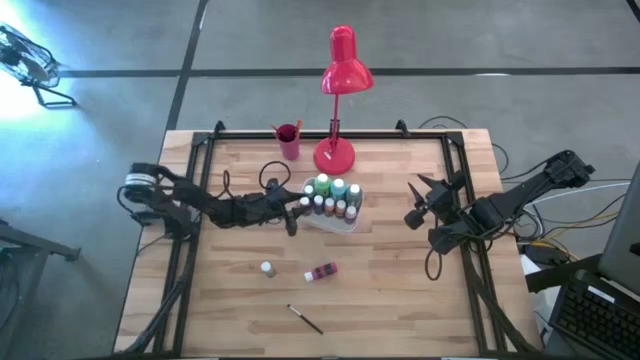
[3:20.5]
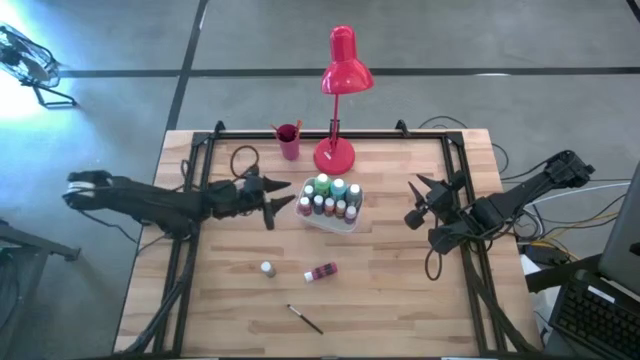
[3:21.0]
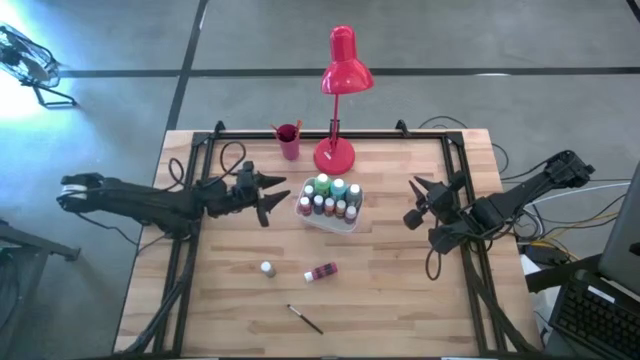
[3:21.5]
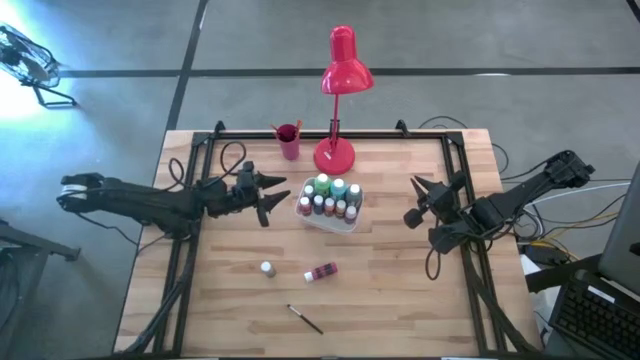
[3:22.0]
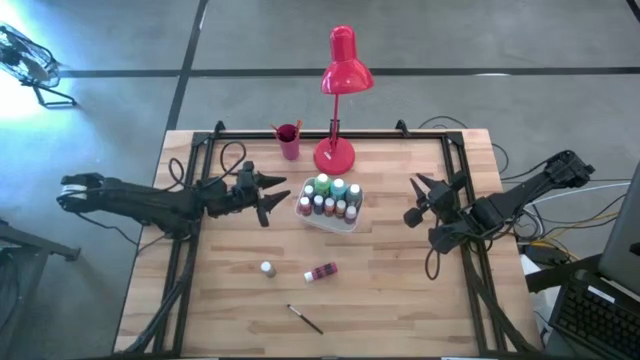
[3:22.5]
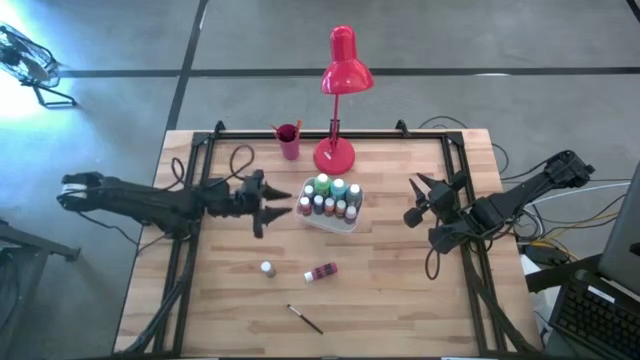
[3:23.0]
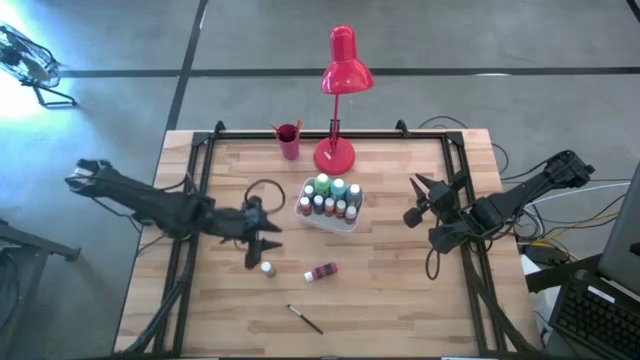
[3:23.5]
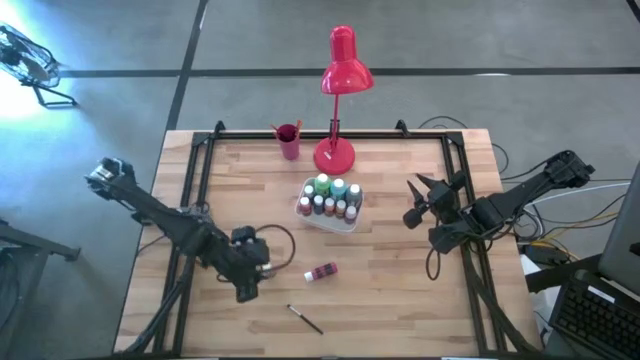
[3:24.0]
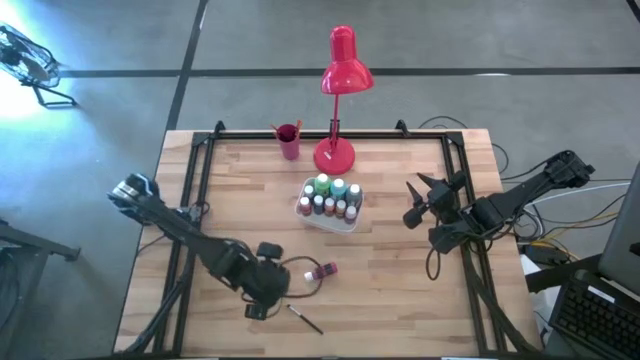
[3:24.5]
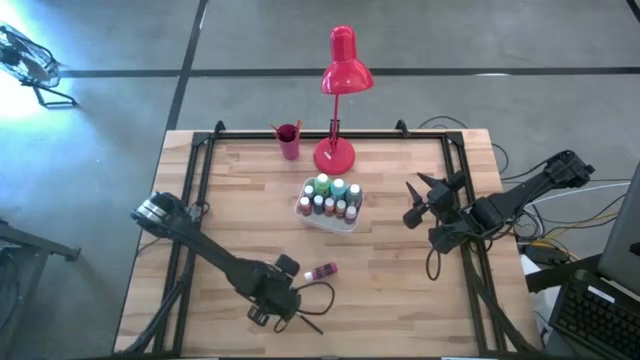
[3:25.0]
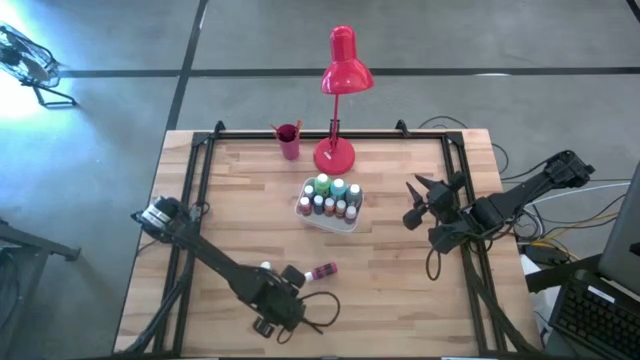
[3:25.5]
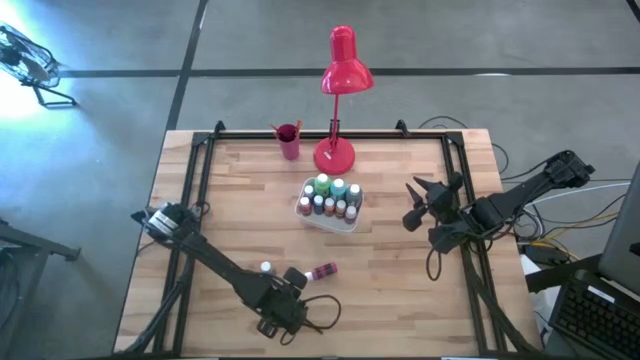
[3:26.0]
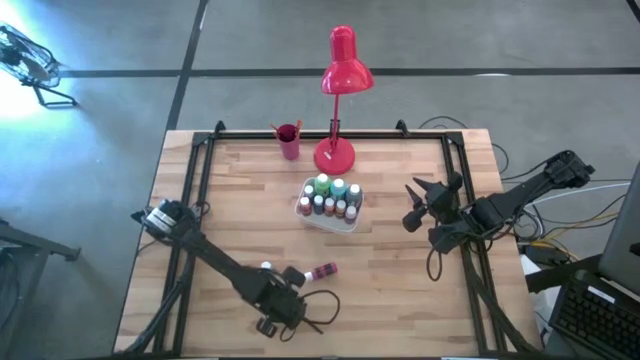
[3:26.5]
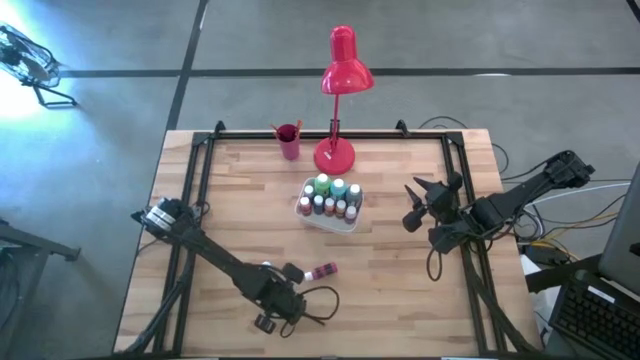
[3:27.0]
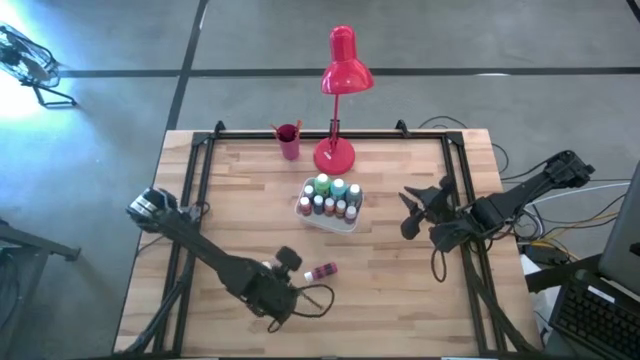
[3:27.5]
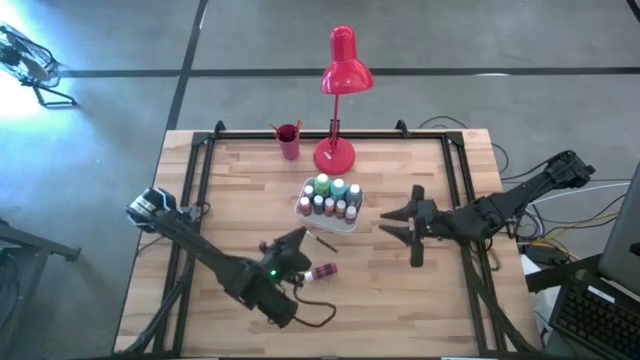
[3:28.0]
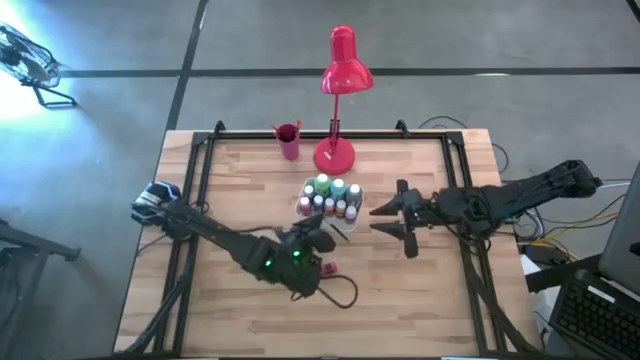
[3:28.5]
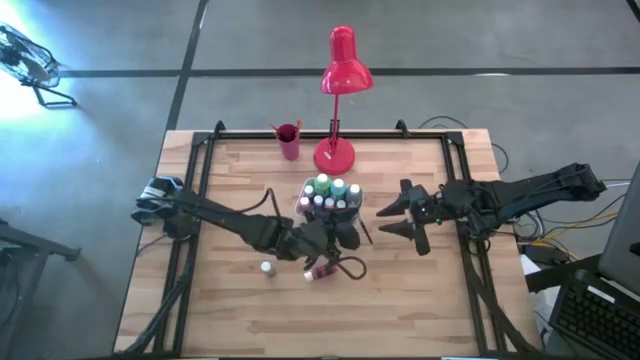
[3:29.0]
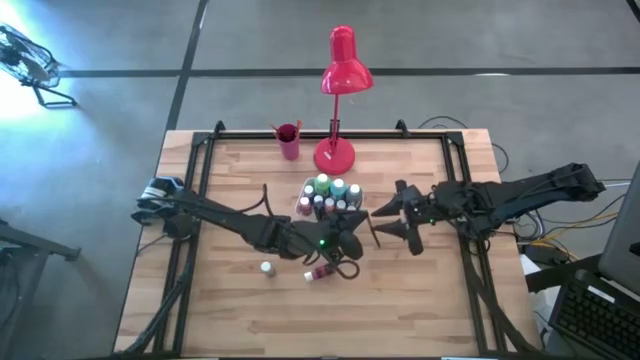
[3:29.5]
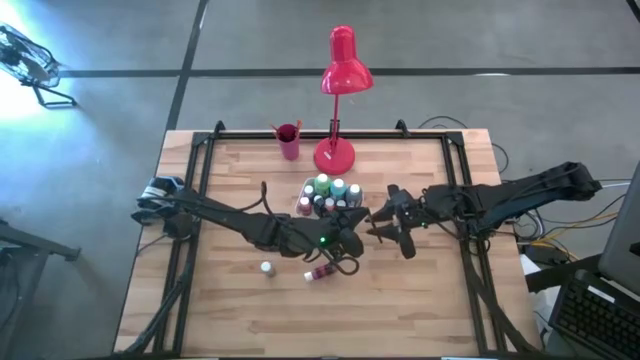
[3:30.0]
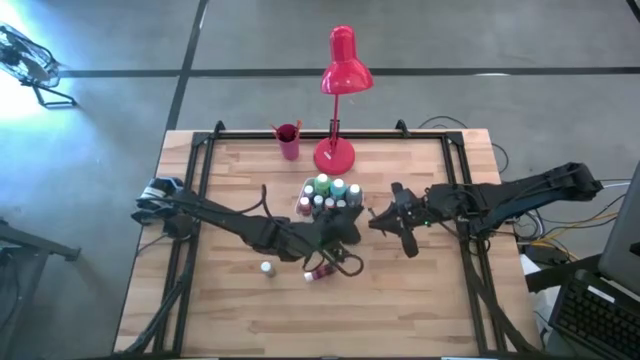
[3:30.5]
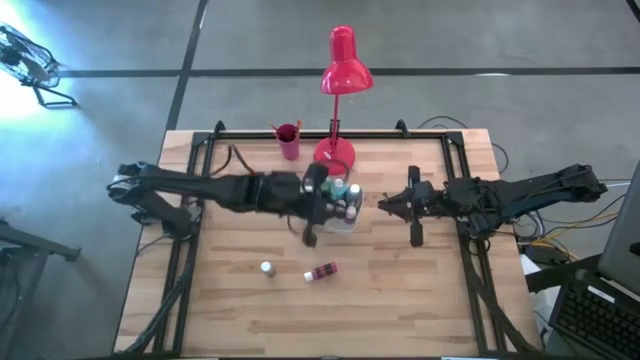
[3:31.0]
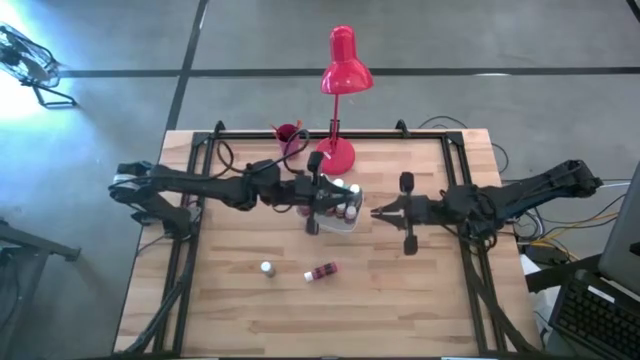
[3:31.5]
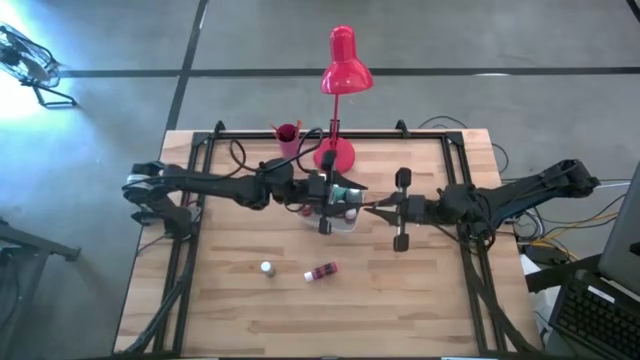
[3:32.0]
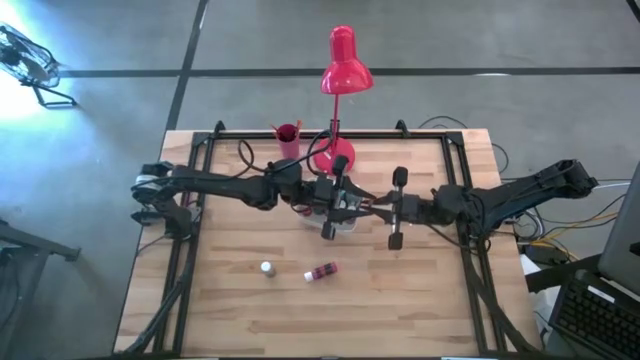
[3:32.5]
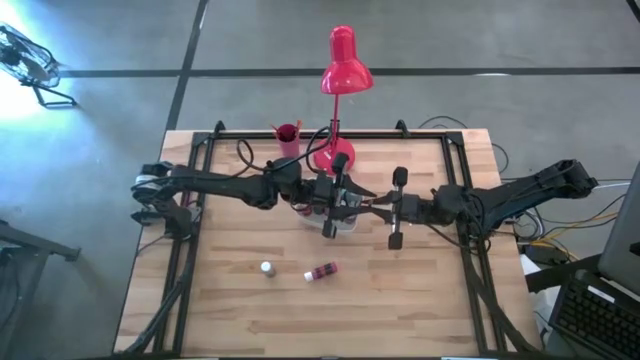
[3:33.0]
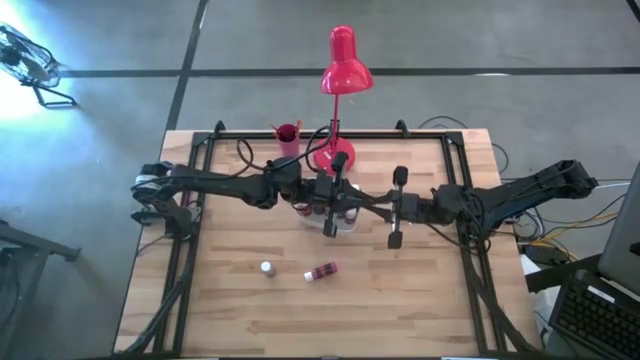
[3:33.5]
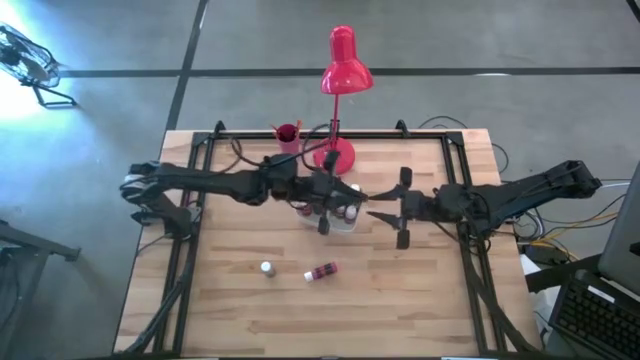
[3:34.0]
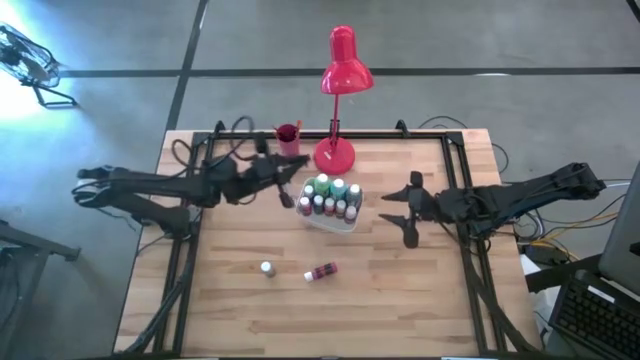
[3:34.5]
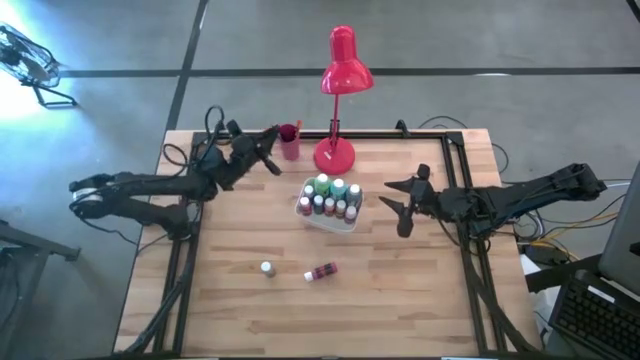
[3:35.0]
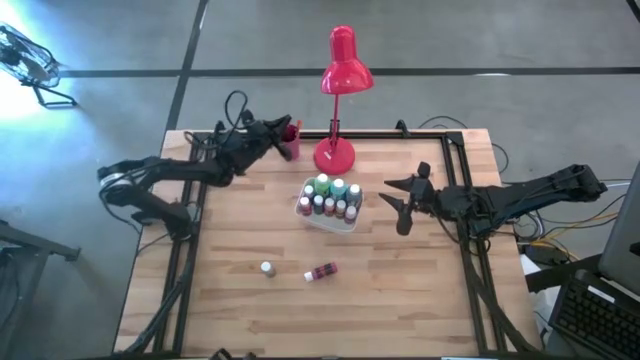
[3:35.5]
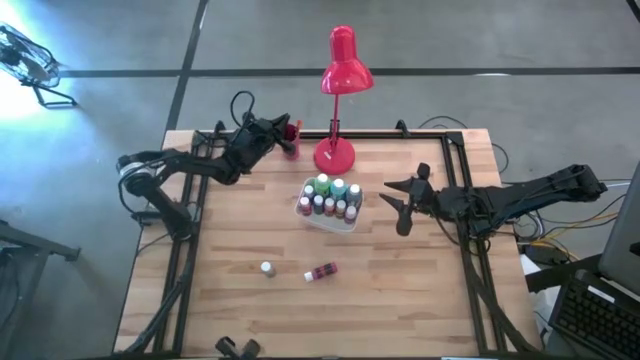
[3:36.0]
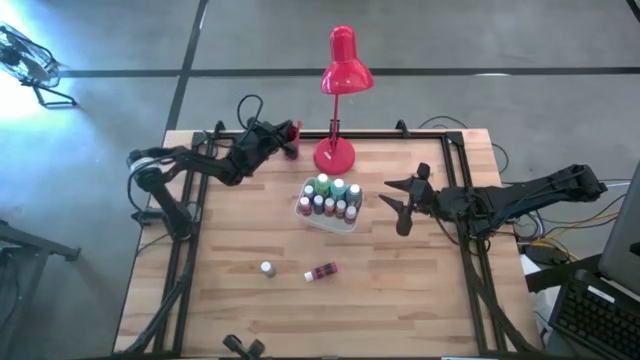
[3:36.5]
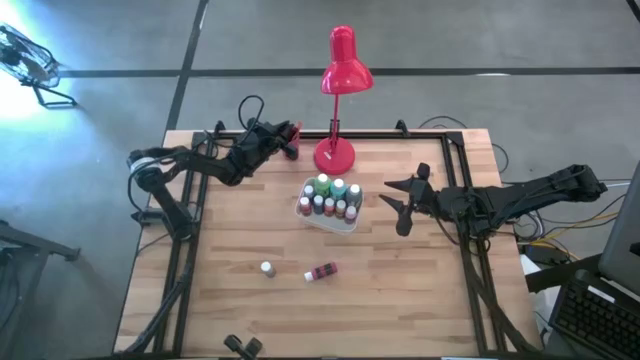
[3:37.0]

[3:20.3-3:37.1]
Task: Pick & Place Paint Supplies
Put the silver paint brush bottle into the red cup

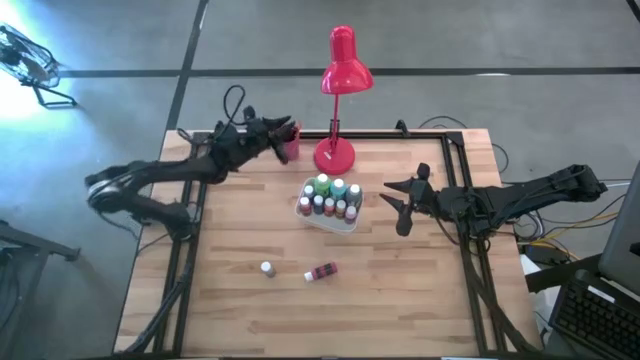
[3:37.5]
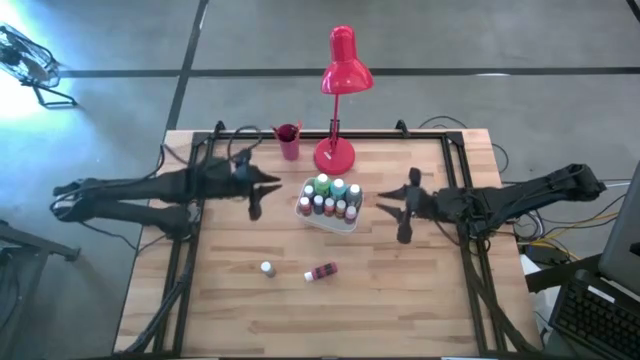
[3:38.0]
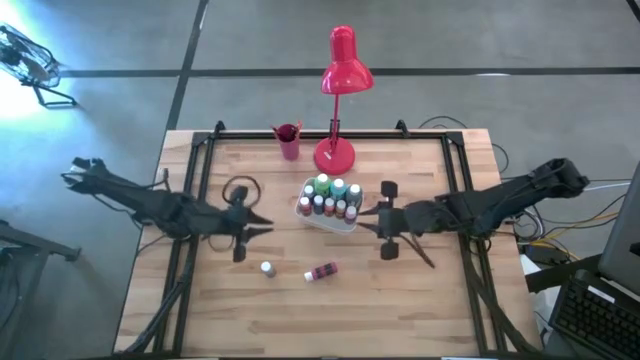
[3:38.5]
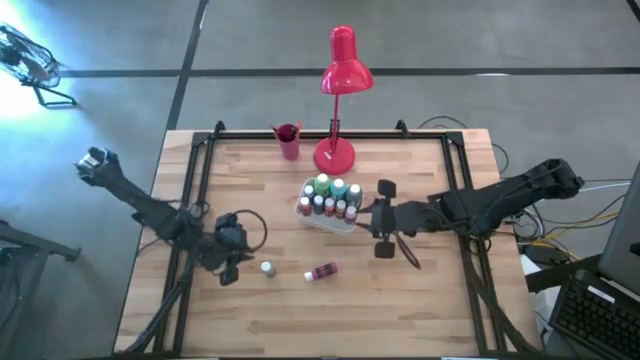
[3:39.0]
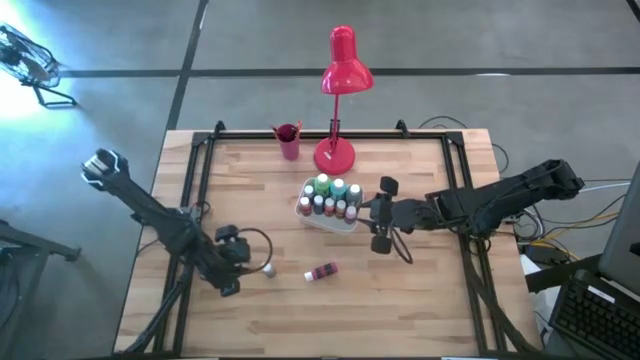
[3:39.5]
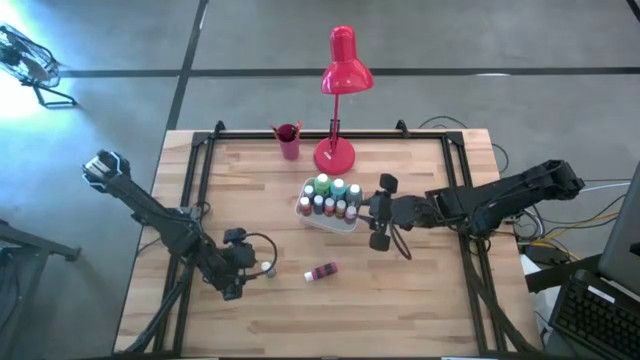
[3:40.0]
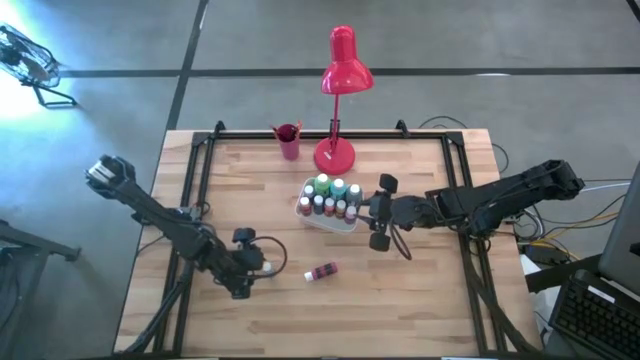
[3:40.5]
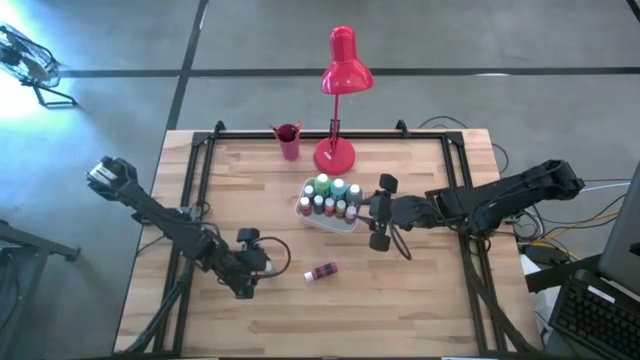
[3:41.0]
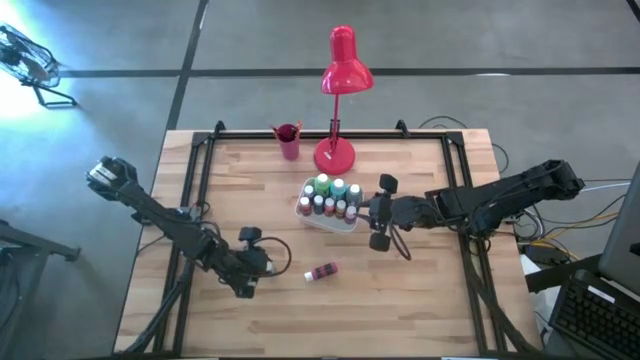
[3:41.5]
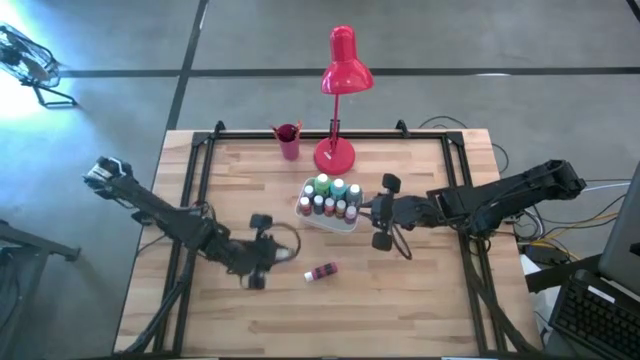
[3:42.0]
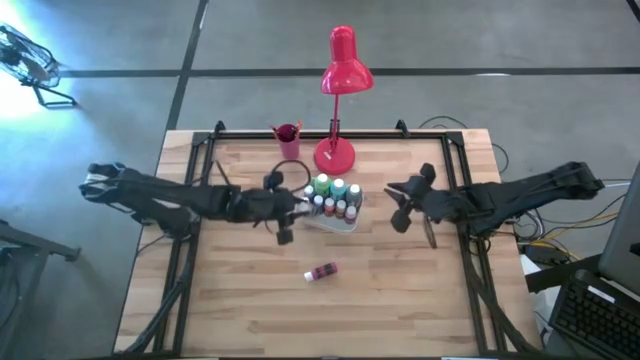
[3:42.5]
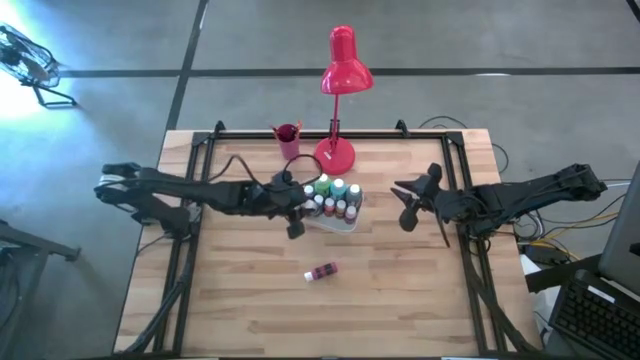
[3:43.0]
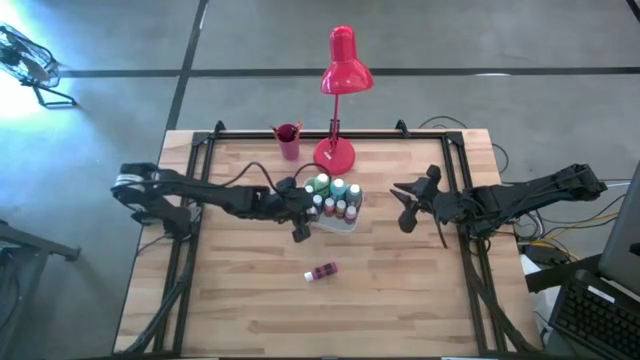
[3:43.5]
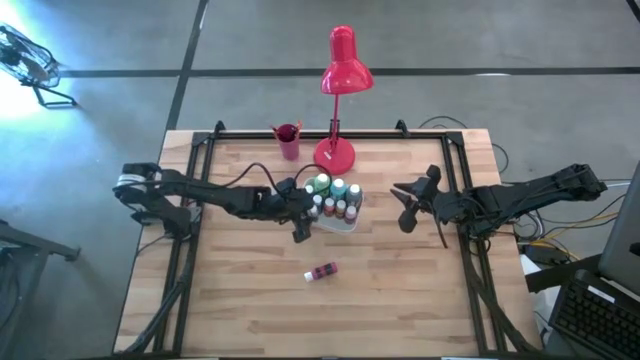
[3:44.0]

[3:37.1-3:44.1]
Put the grey paint bottle into the white bin
